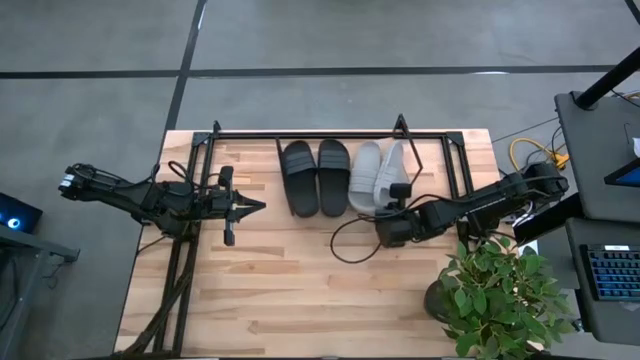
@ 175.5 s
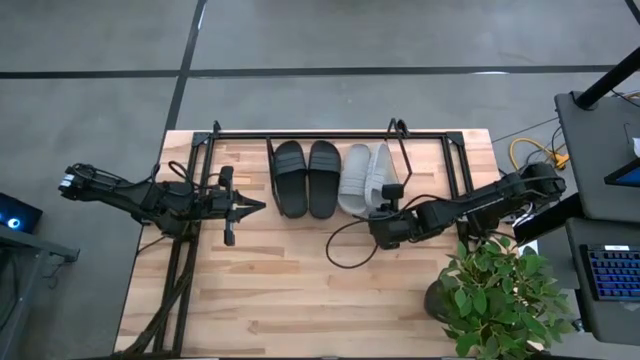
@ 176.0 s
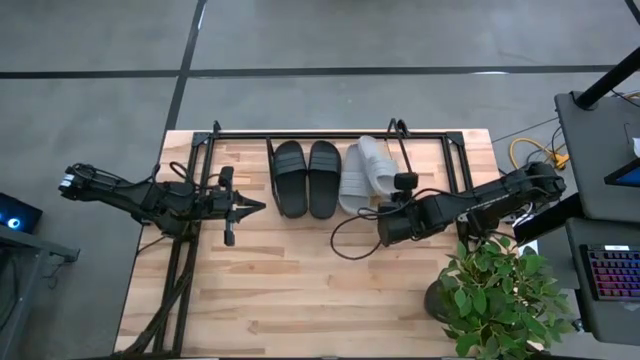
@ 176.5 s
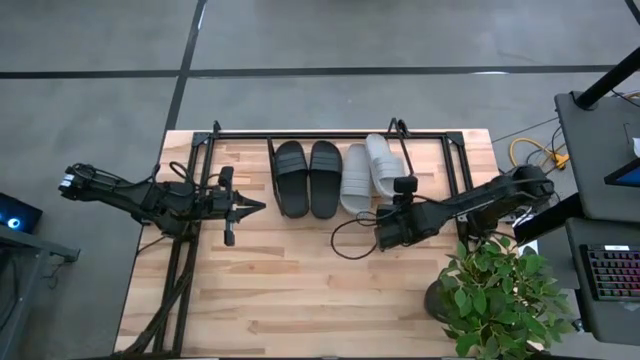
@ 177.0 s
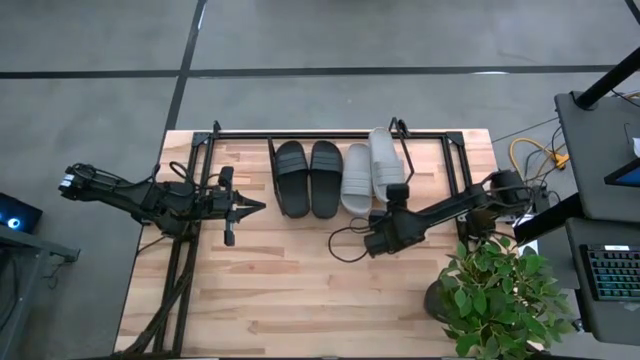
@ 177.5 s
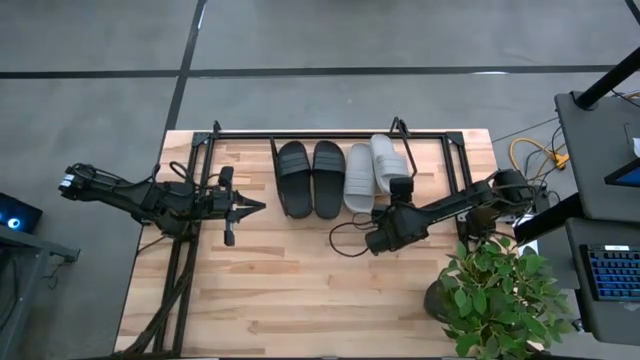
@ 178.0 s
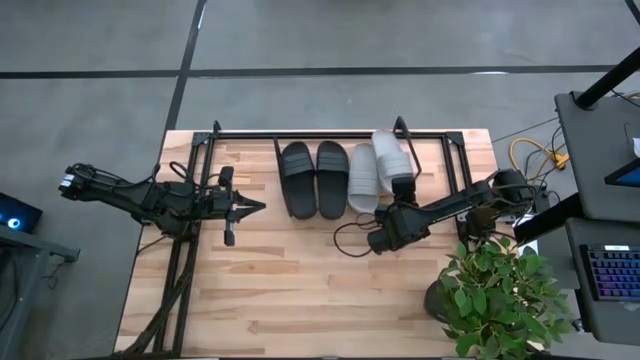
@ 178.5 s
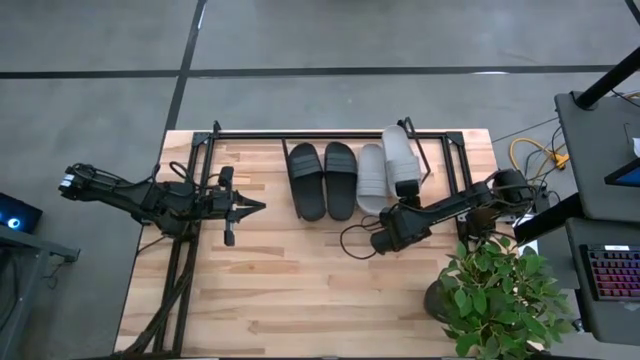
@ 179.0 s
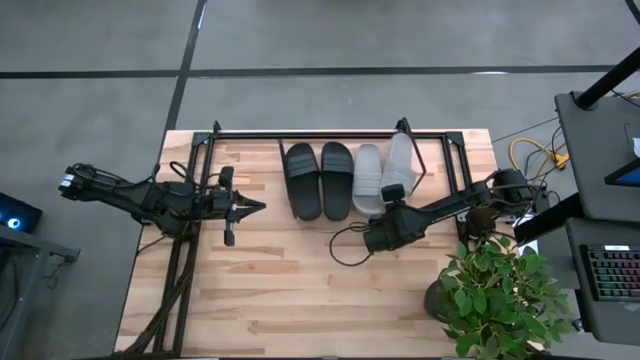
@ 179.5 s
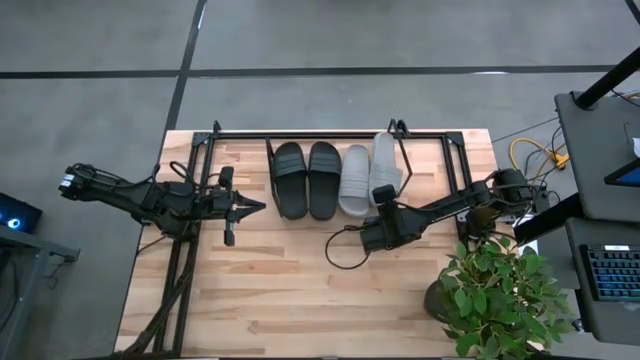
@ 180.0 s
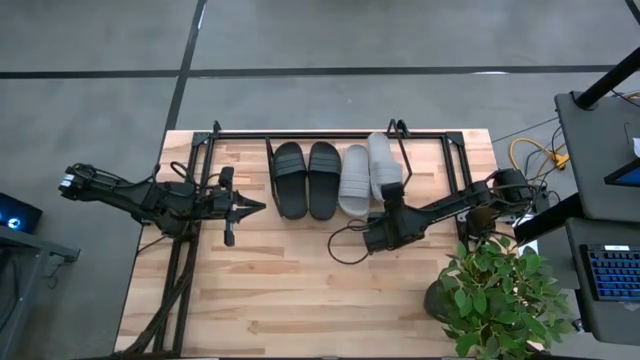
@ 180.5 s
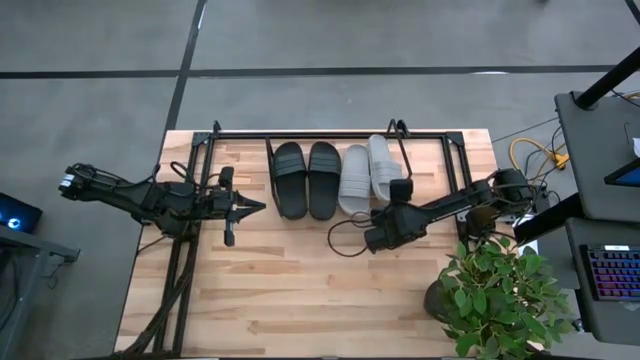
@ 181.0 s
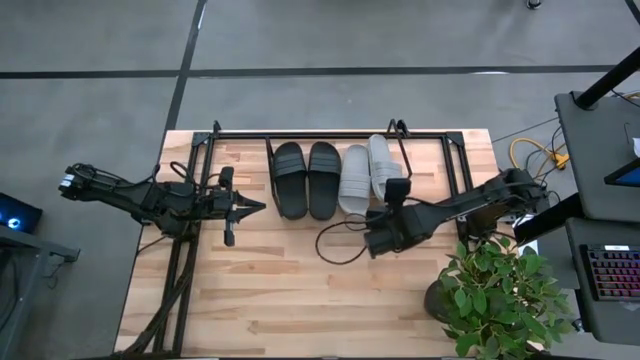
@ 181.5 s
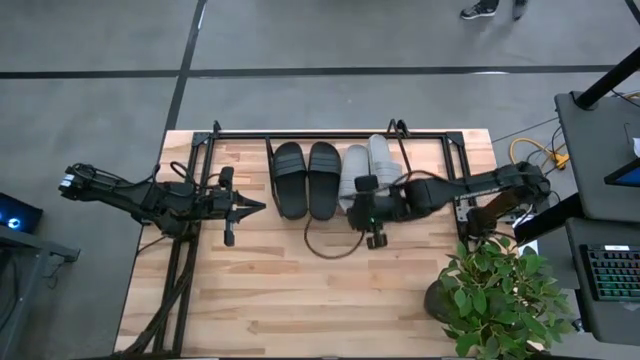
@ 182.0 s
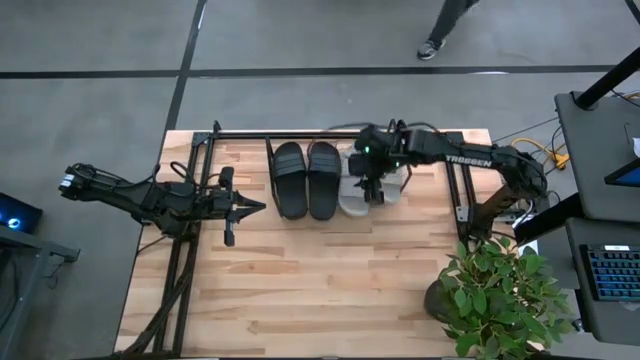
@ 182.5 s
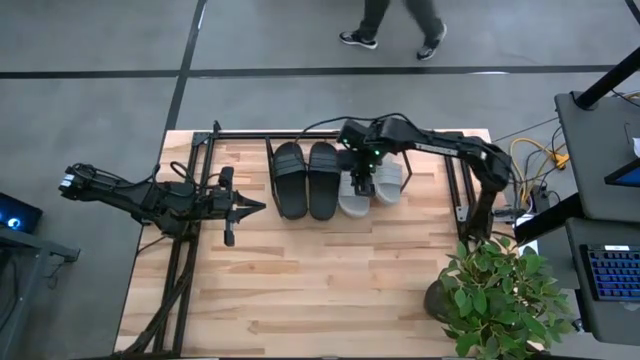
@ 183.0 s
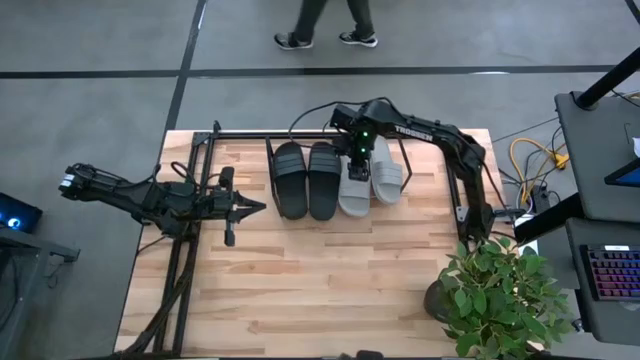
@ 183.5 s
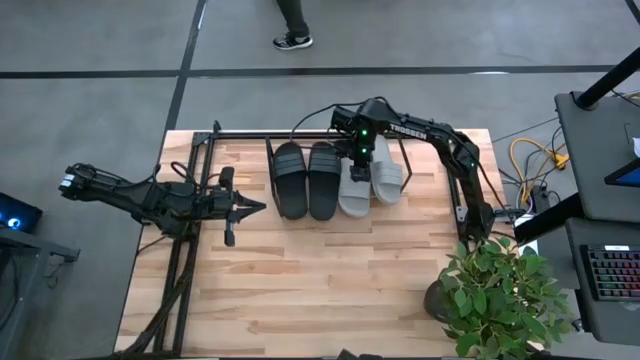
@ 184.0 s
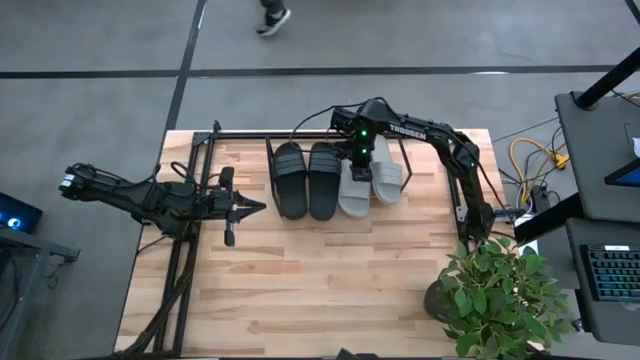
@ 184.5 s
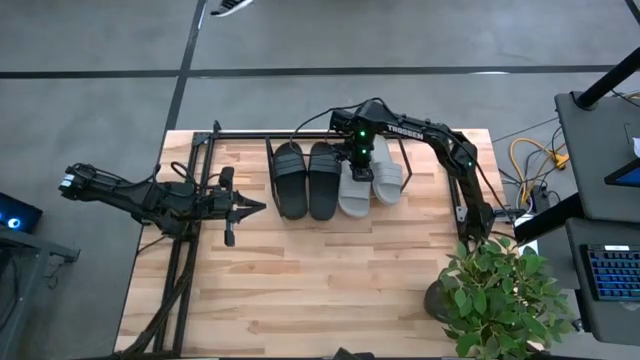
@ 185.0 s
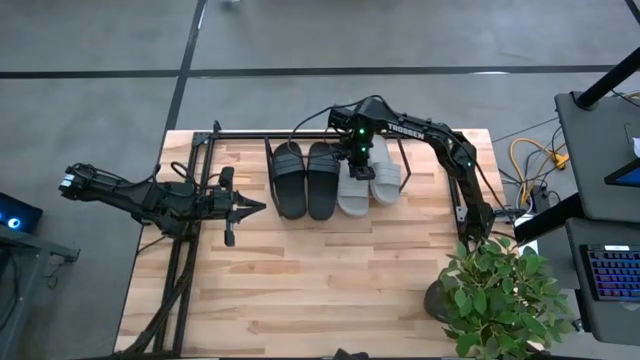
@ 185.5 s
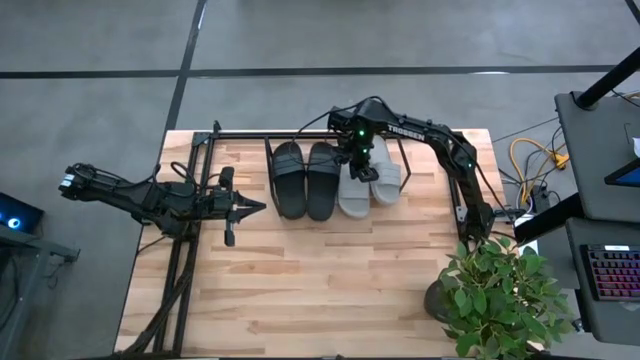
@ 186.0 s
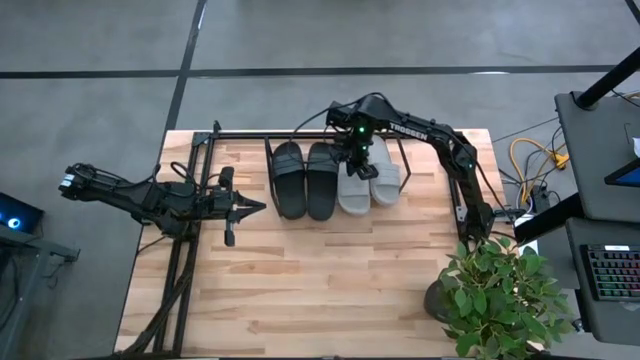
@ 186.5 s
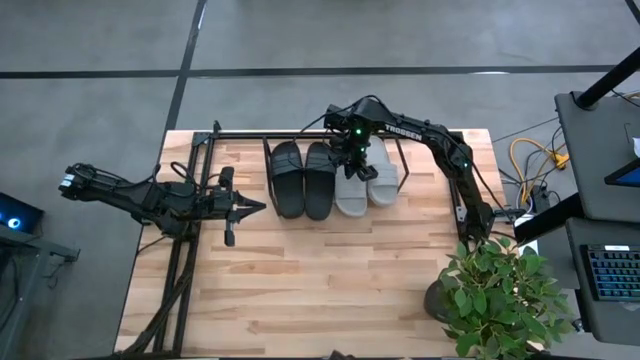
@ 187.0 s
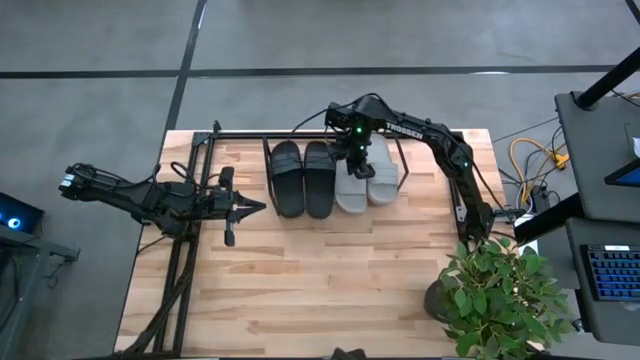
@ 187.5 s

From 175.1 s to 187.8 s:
Task: Pick and place slides into the shelf
Adjust the gray slides from the shelf

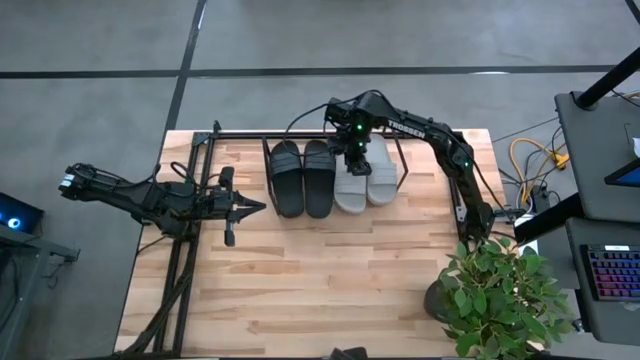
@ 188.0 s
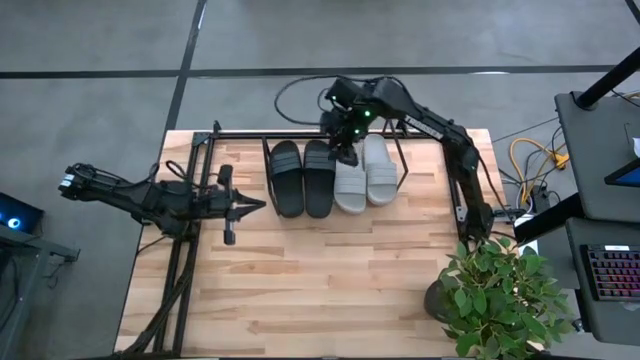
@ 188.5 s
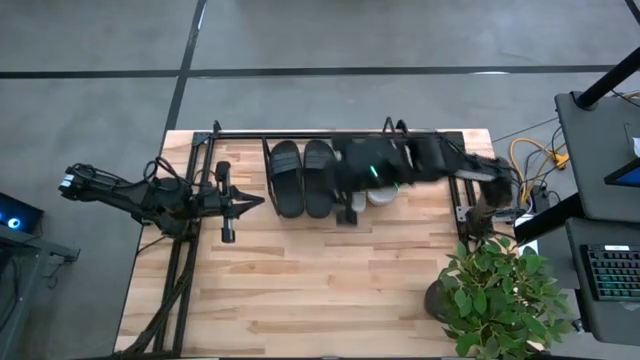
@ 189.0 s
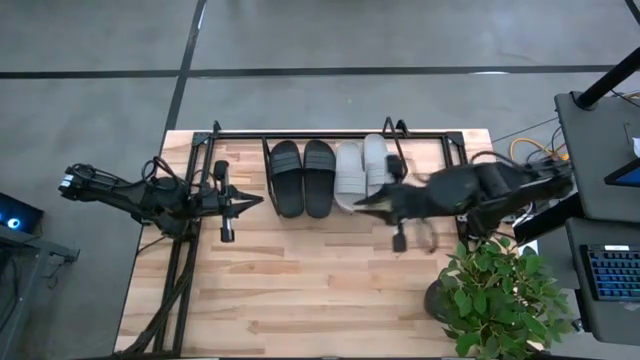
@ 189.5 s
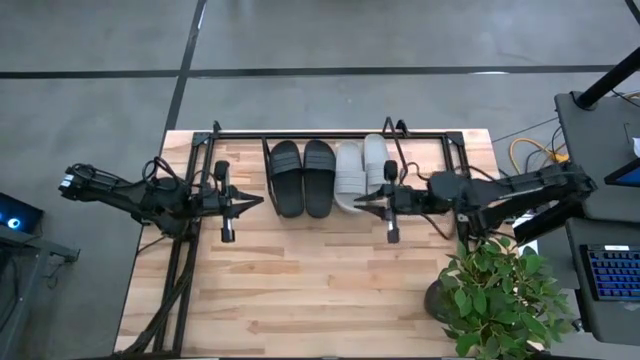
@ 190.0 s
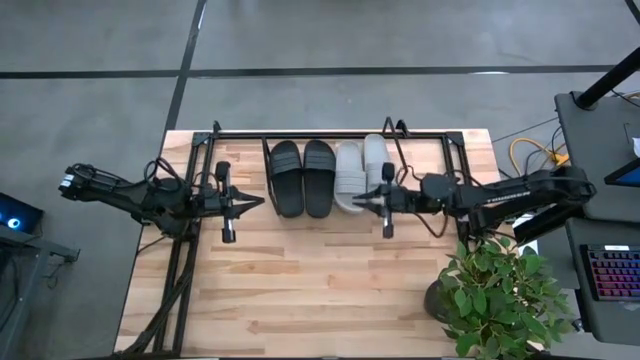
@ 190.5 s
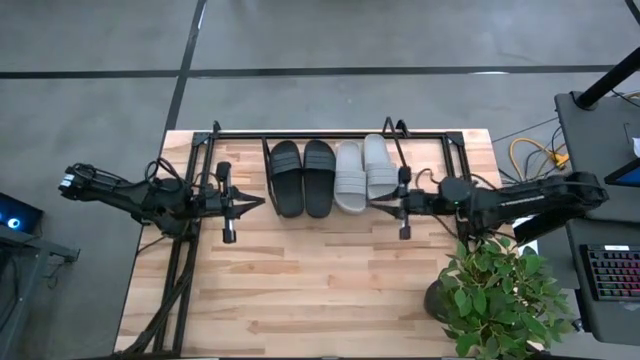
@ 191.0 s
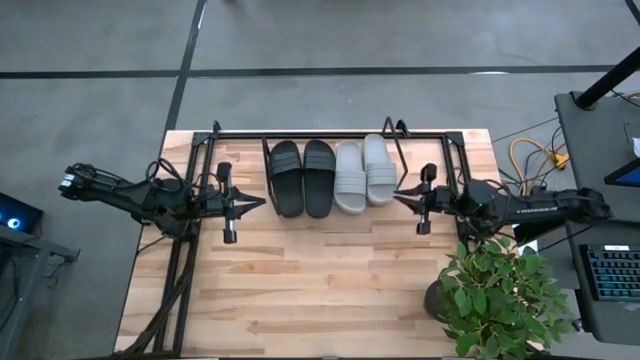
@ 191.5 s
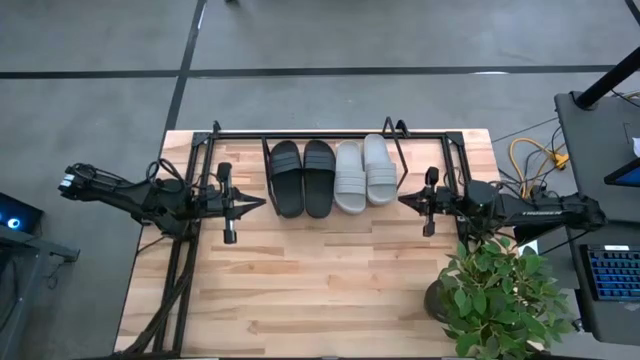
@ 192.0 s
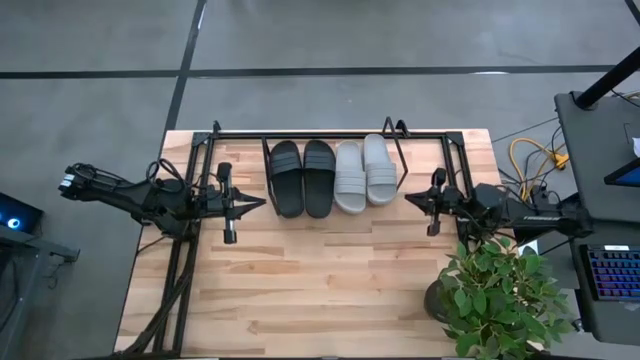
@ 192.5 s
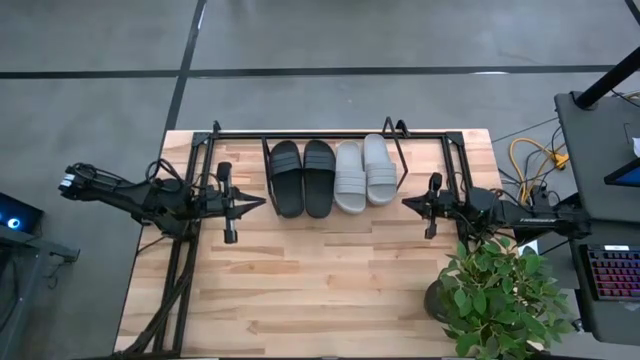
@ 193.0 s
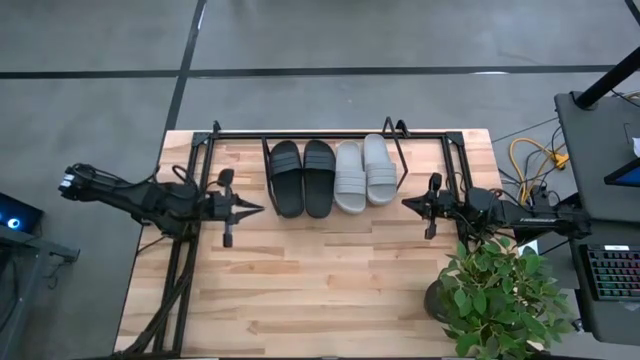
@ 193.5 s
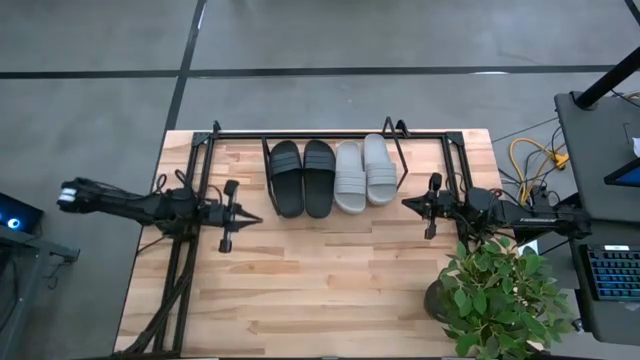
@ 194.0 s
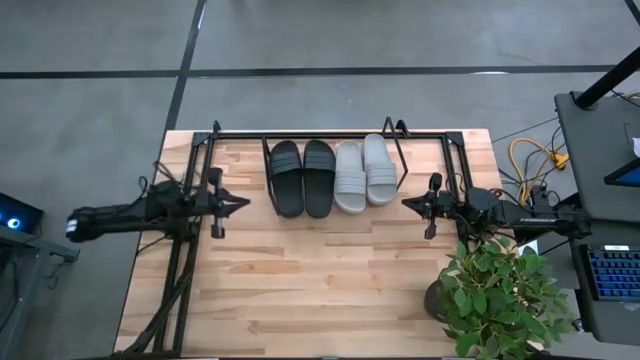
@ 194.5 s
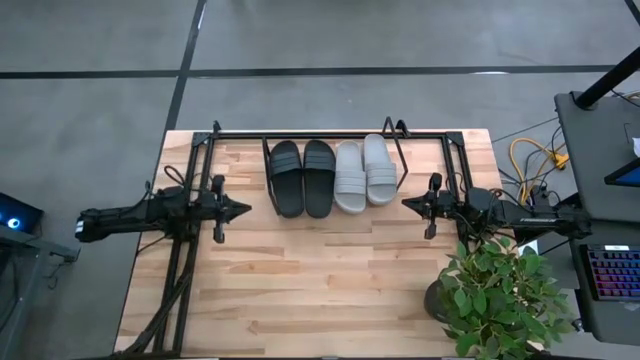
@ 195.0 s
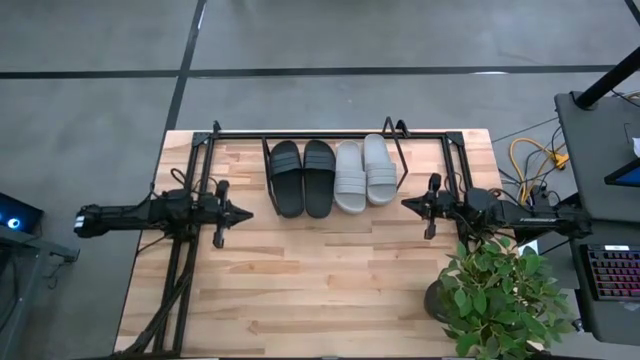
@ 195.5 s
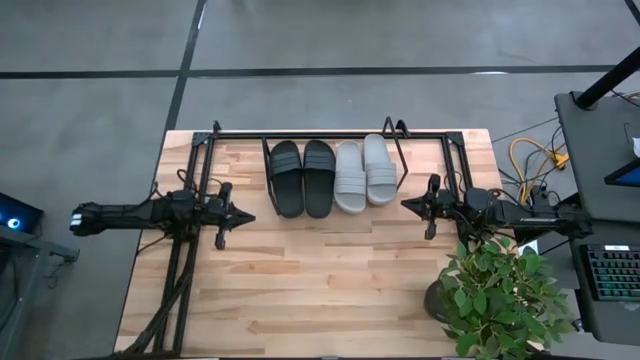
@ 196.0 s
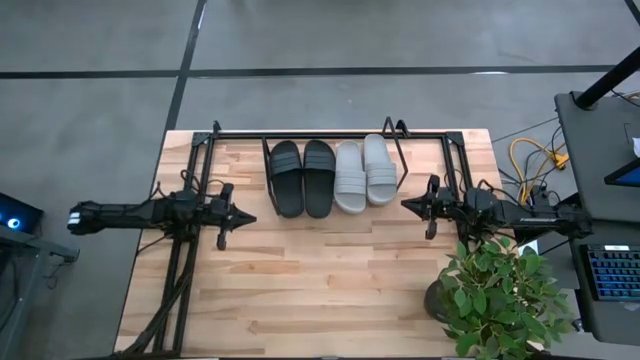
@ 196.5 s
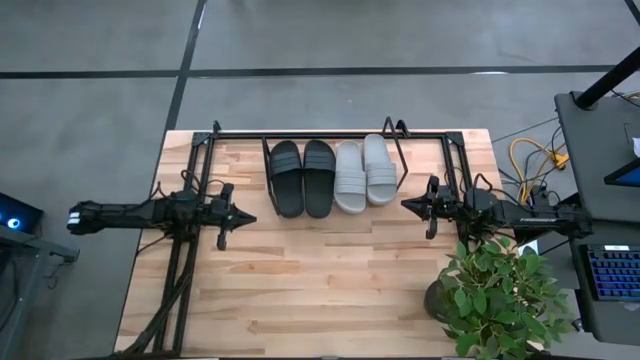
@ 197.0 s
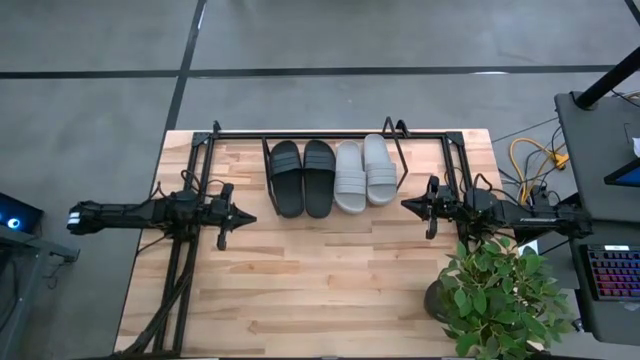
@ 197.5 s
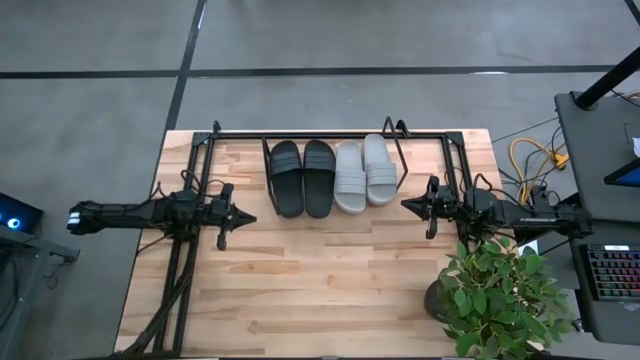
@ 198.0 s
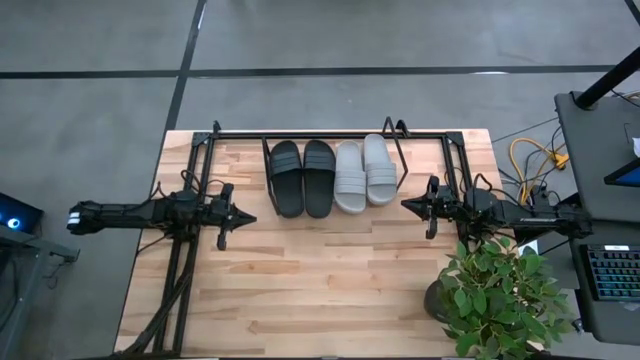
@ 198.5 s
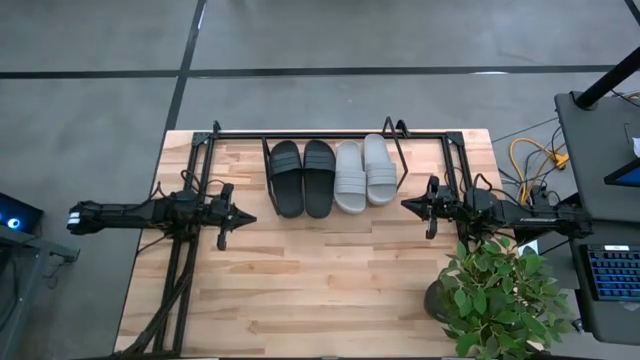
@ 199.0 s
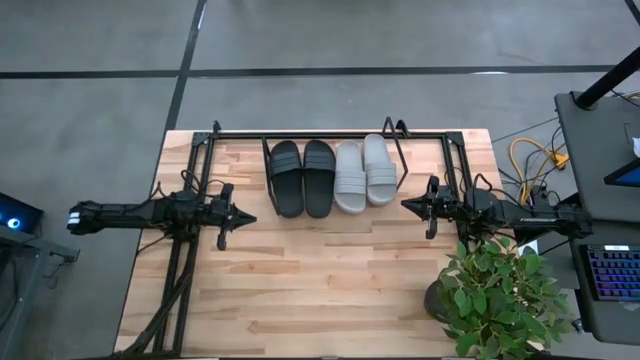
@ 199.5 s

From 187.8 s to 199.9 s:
Return to Home Position
